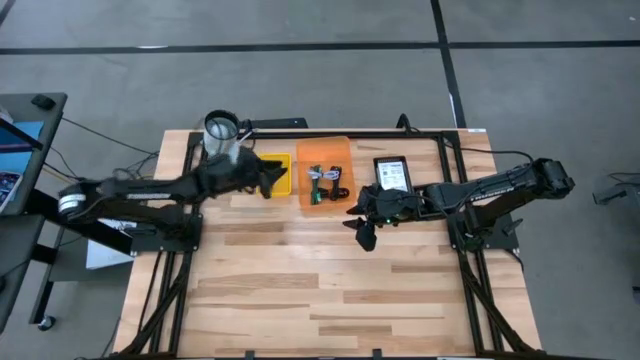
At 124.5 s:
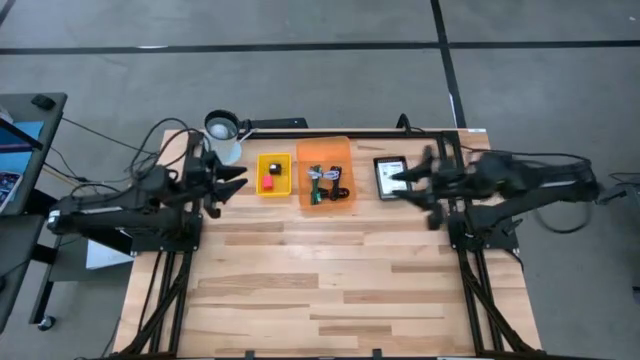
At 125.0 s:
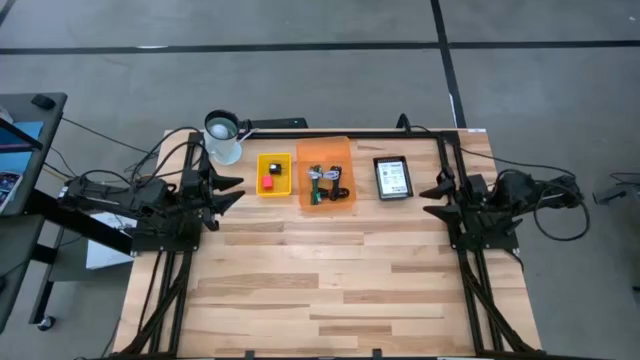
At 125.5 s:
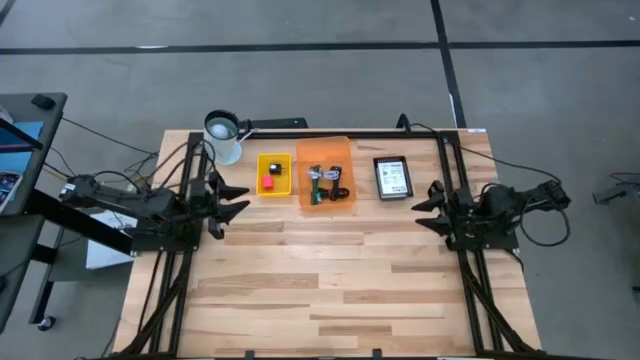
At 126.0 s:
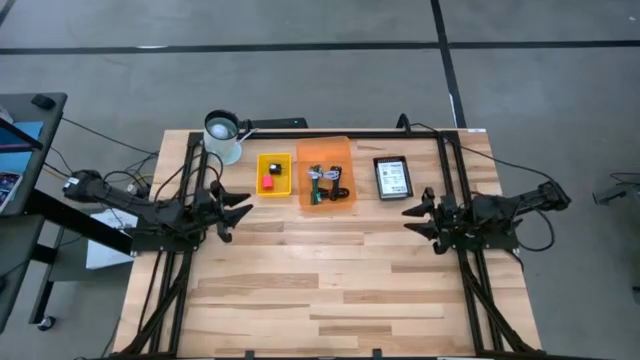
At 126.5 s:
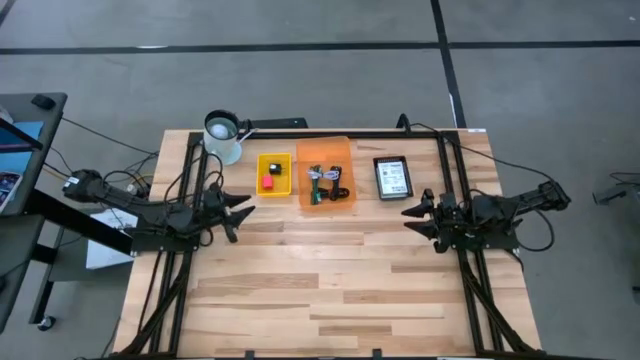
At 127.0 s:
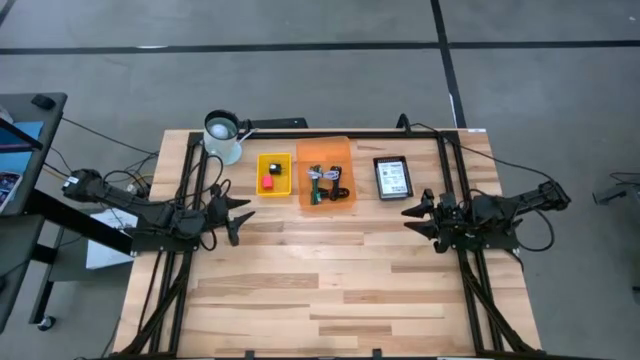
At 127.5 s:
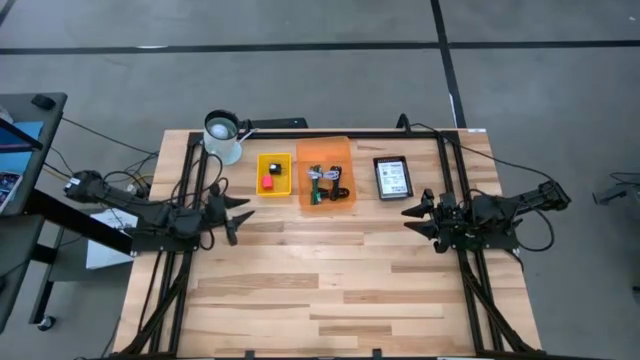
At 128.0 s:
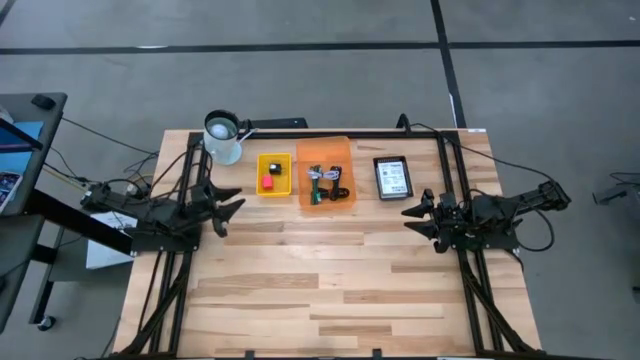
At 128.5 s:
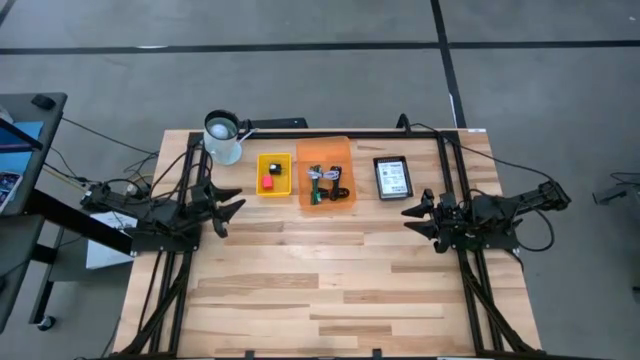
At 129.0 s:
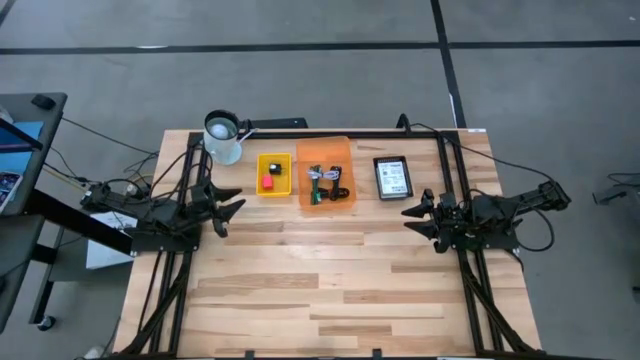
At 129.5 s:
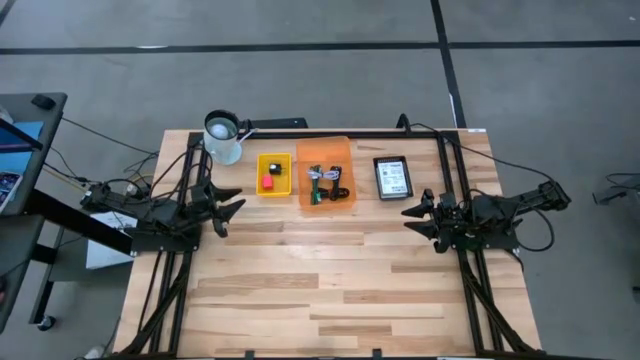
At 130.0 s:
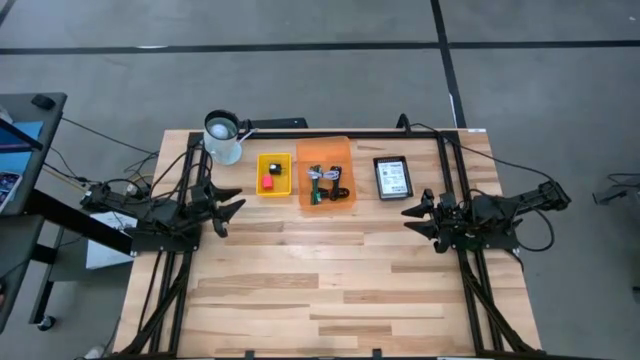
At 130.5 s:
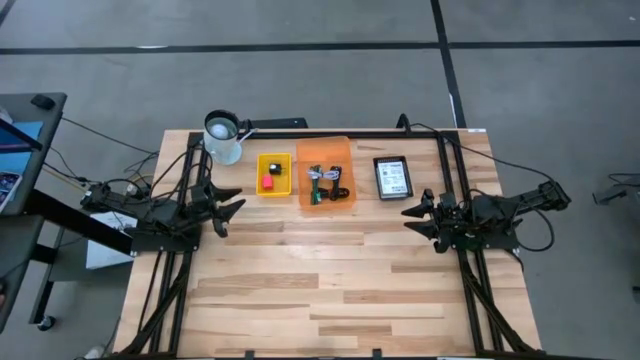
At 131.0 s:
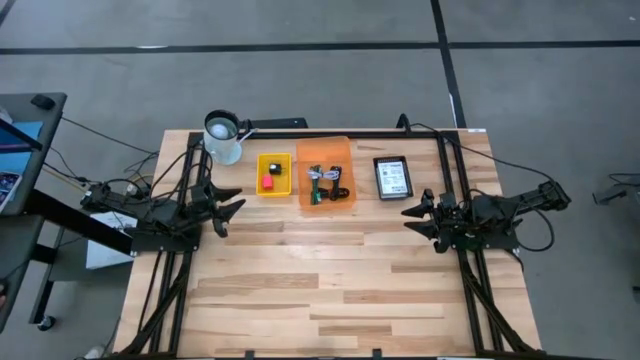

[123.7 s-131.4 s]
Task: Pick and place items into bin
Return to home position

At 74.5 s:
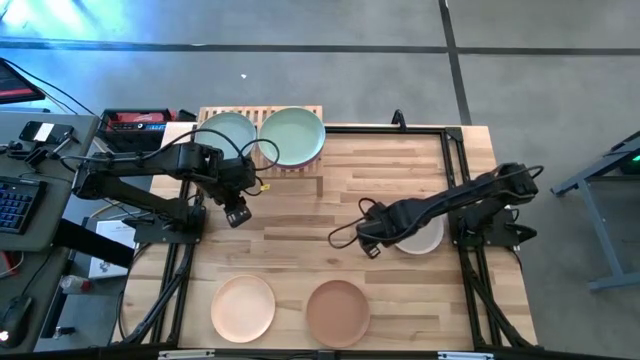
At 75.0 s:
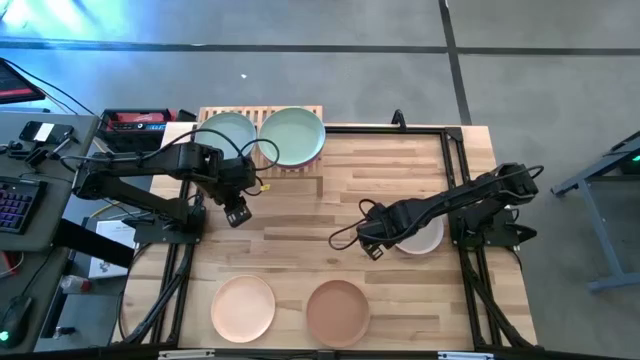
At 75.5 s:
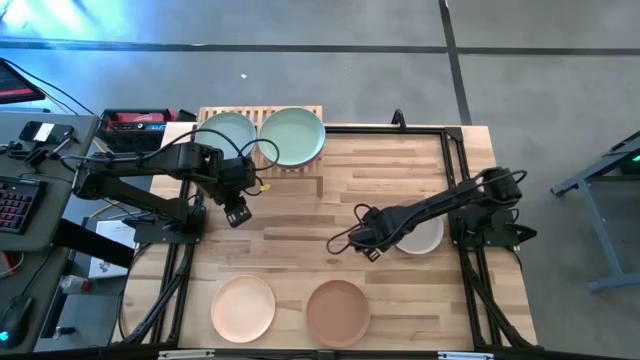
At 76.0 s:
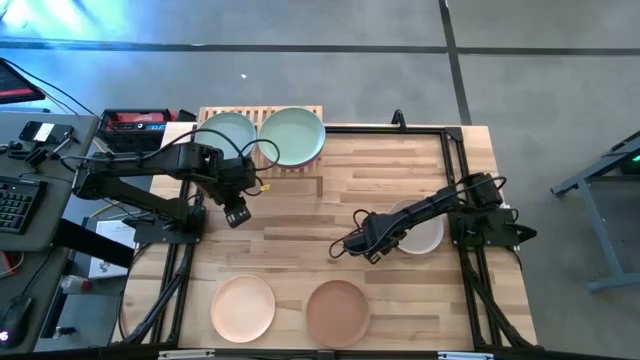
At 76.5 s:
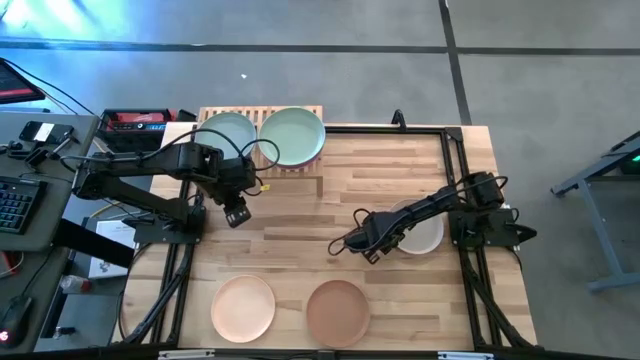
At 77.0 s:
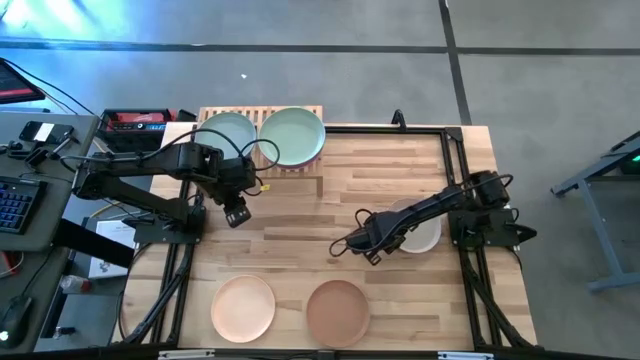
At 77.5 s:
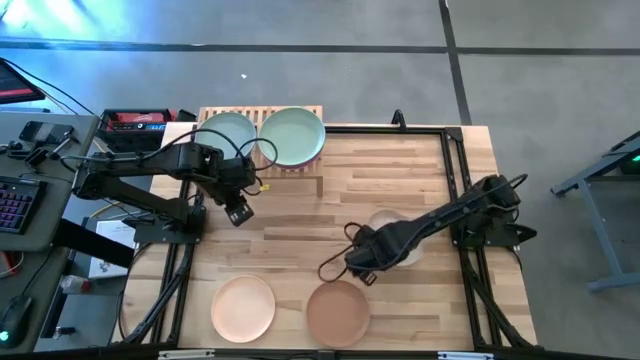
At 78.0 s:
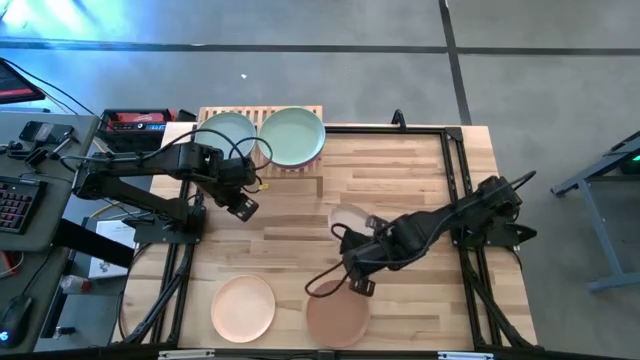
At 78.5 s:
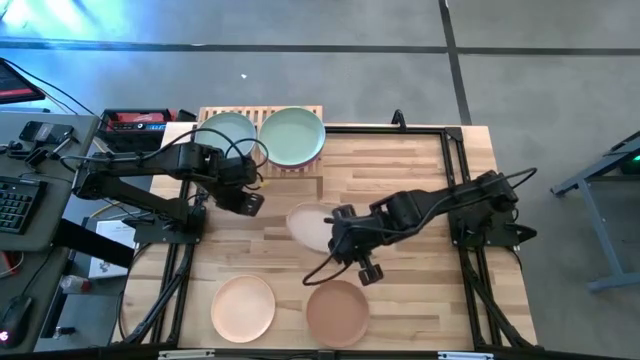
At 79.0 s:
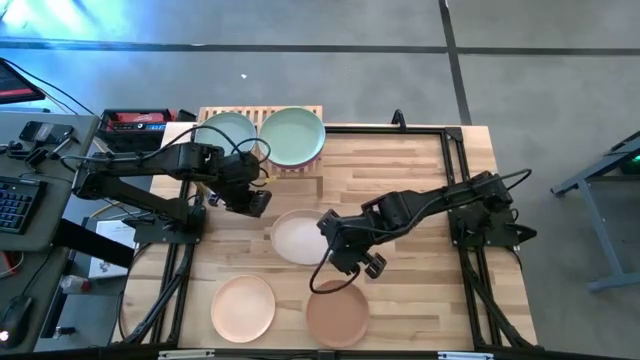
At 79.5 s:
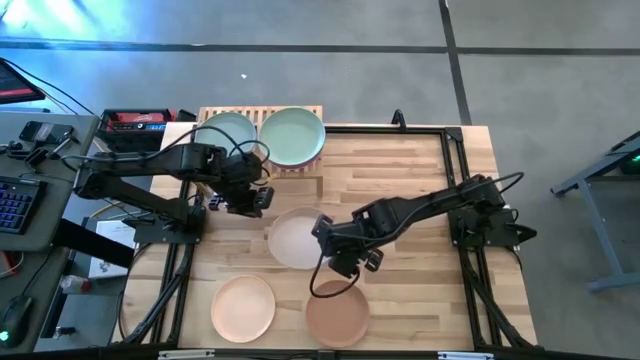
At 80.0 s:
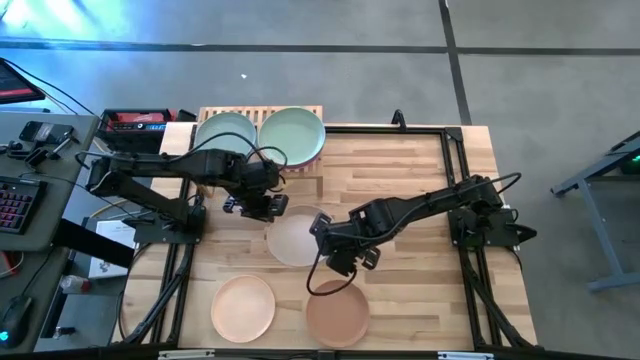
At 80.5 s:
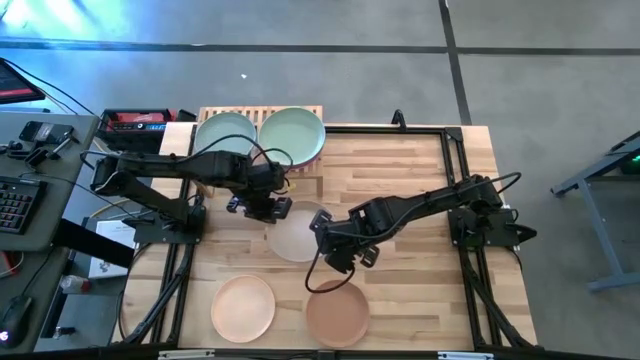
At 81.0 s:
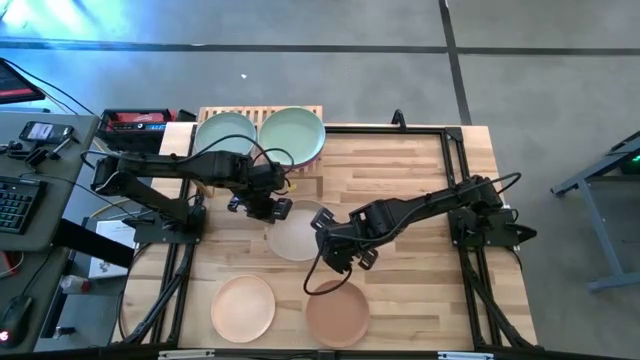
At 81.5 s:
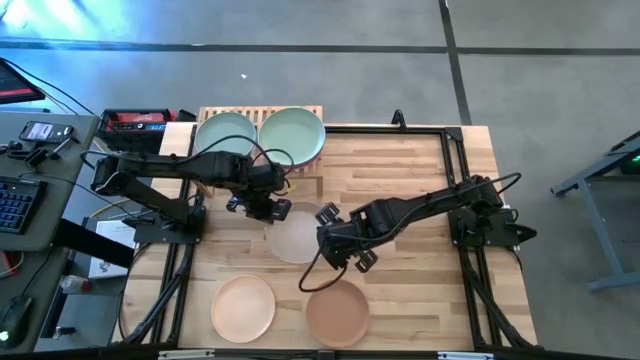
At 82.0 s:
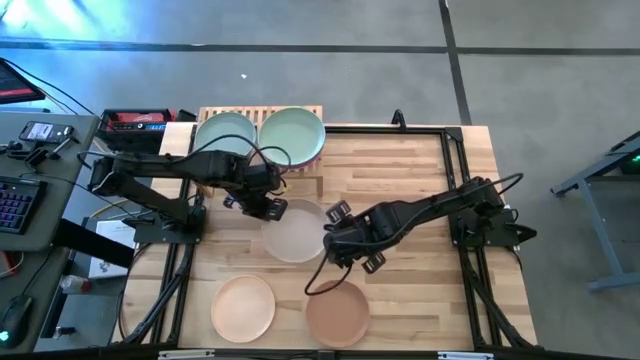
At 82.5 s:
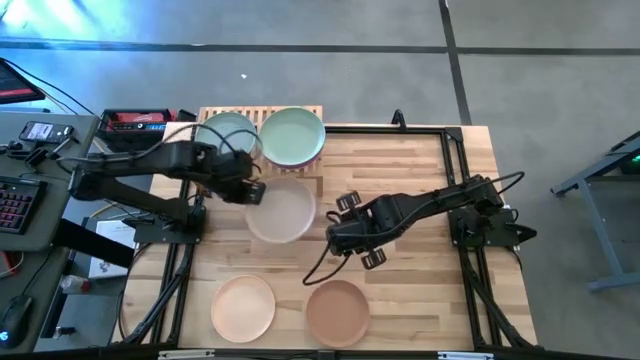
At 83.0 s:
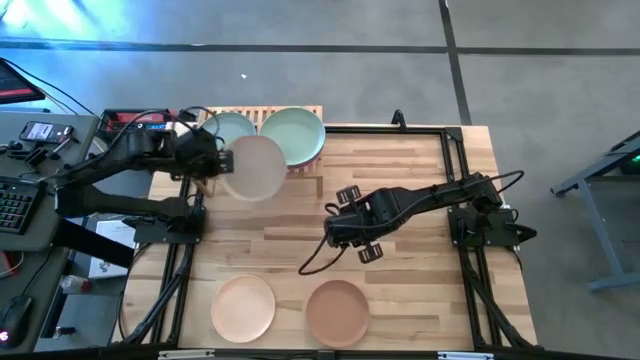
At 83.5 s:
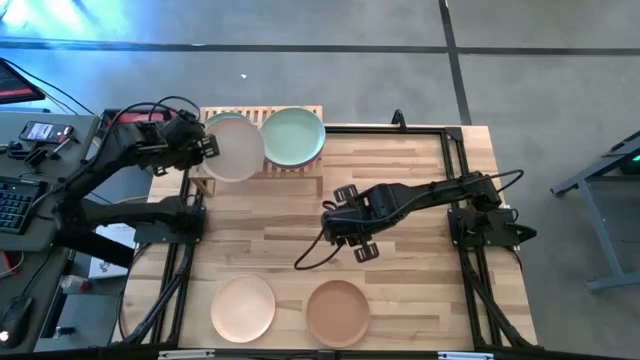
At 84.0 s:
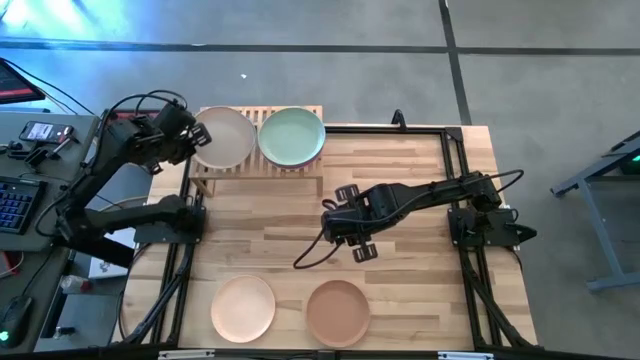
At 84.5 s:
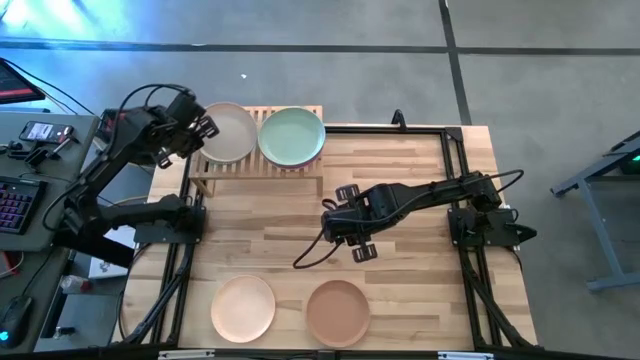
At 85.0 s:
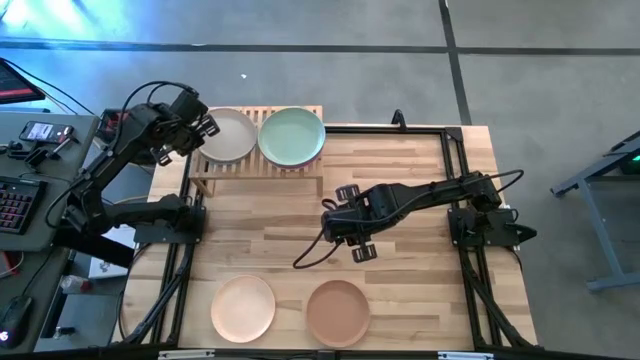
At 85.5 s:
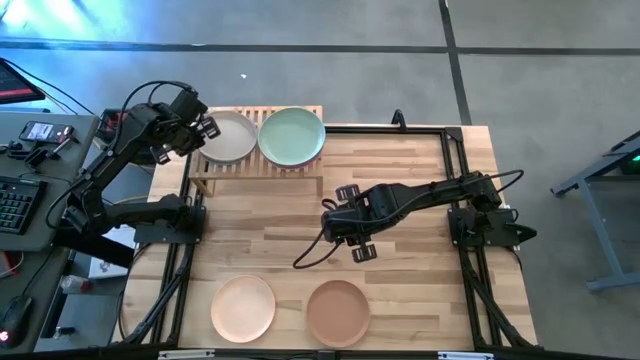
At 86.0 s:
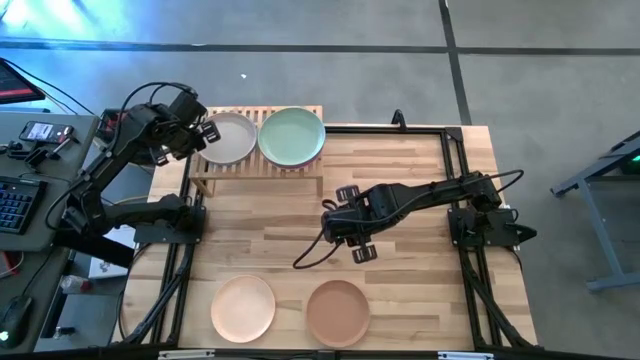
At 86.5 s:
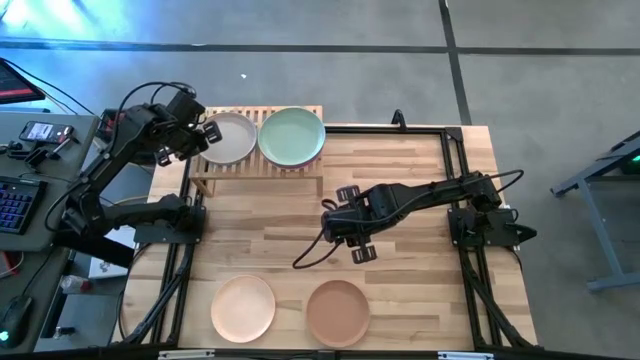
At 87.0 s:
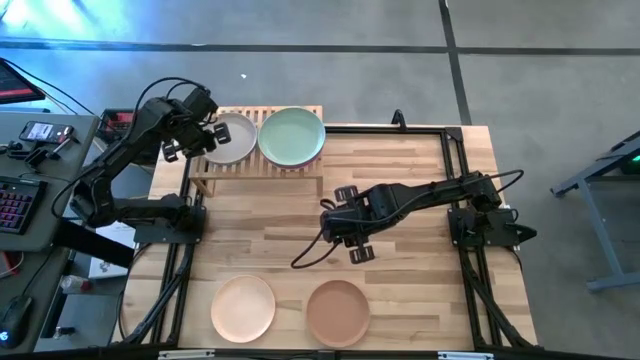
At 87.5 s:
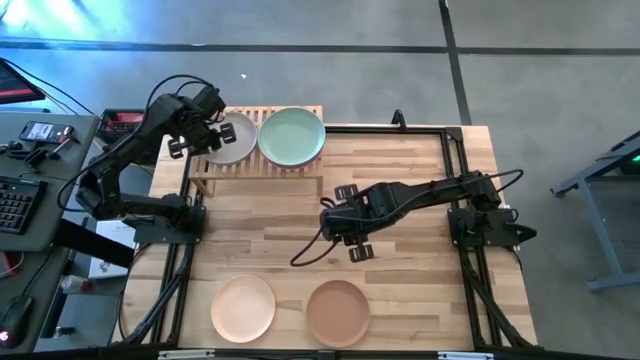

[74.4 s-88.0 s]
Task: Place and stack plates onto a shelf
Stack the gray plate on top of the blue plate on the shelf
